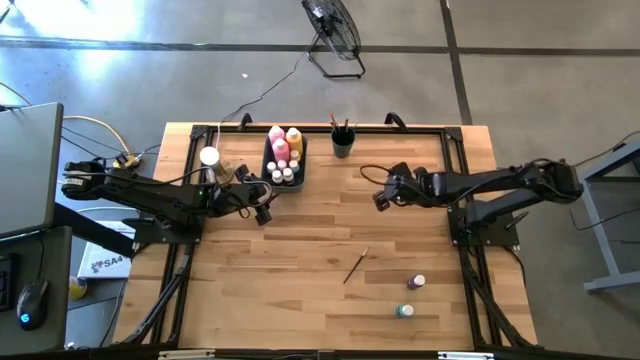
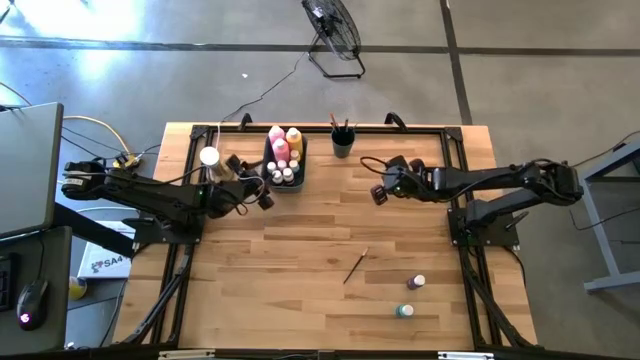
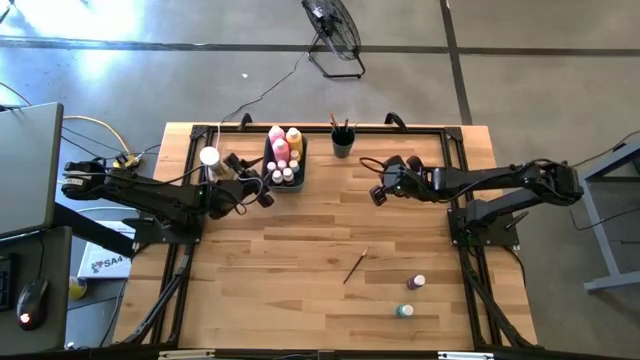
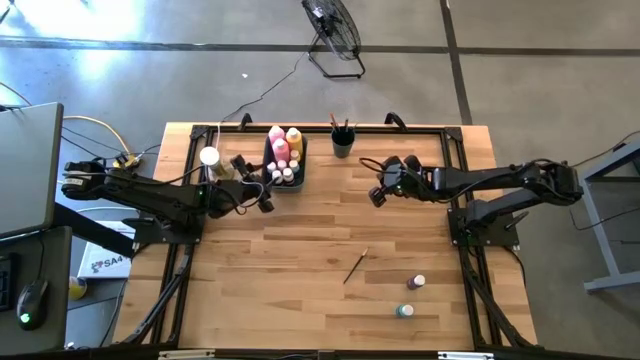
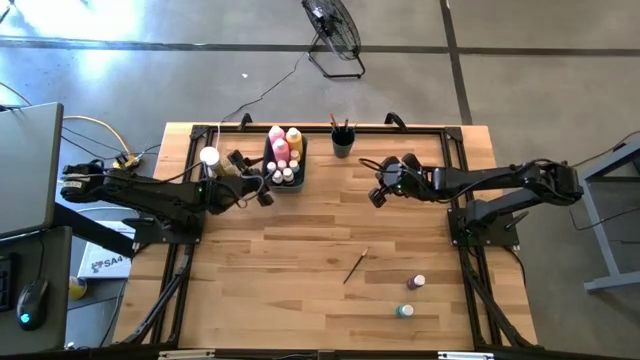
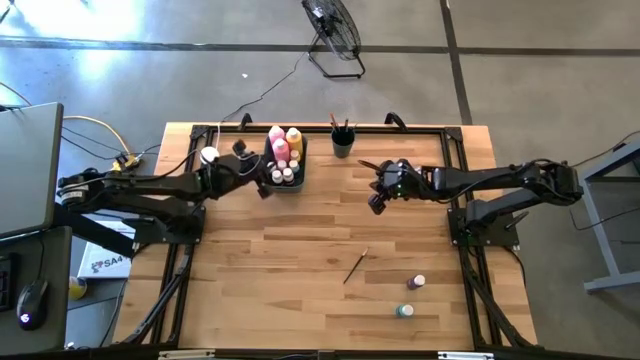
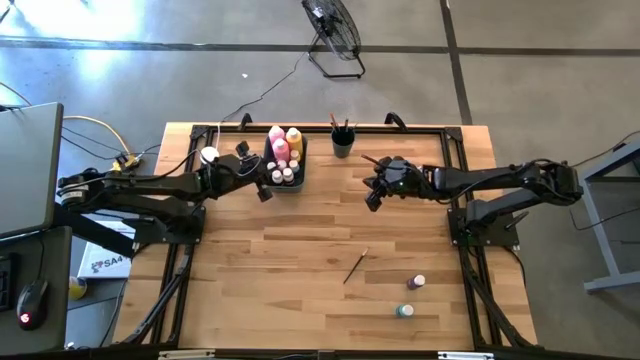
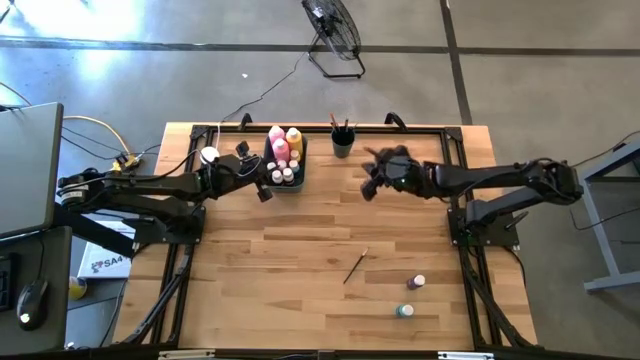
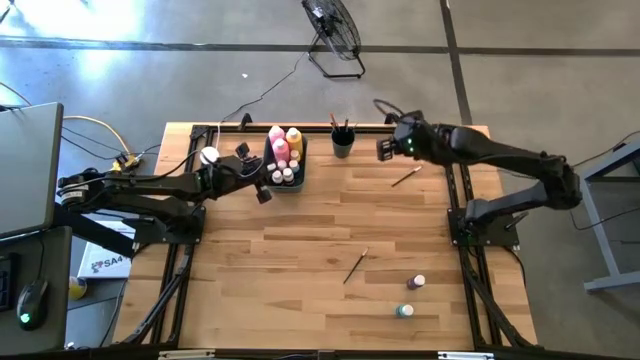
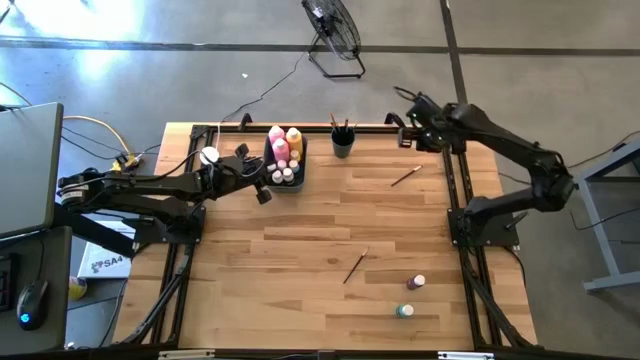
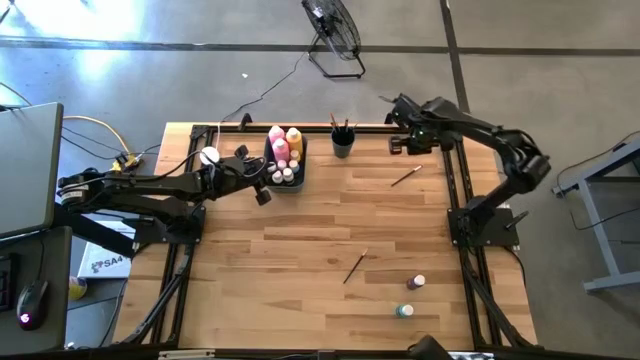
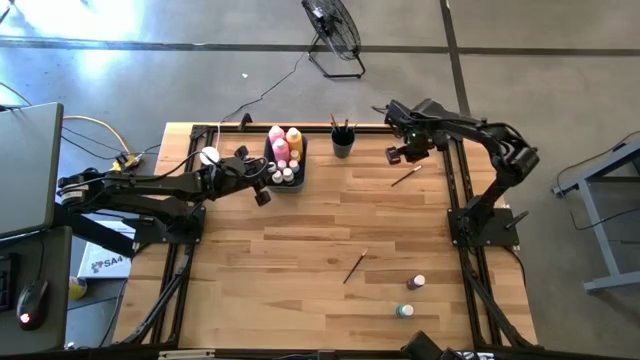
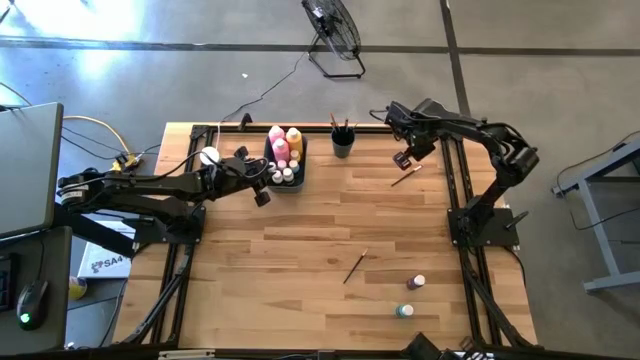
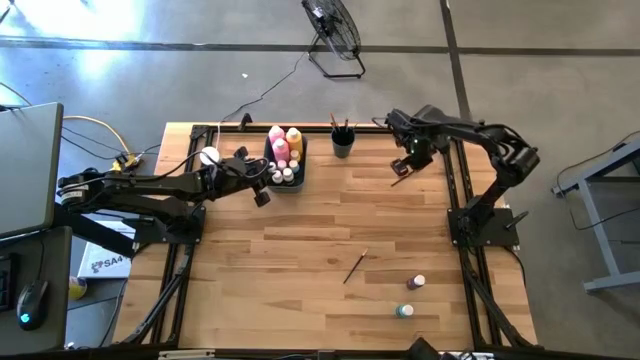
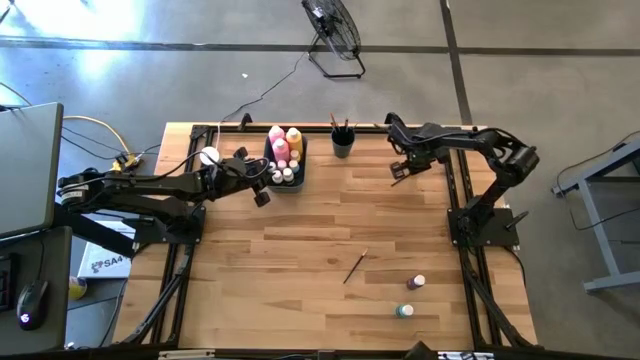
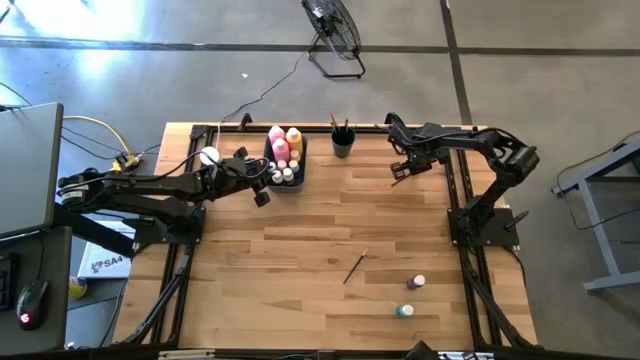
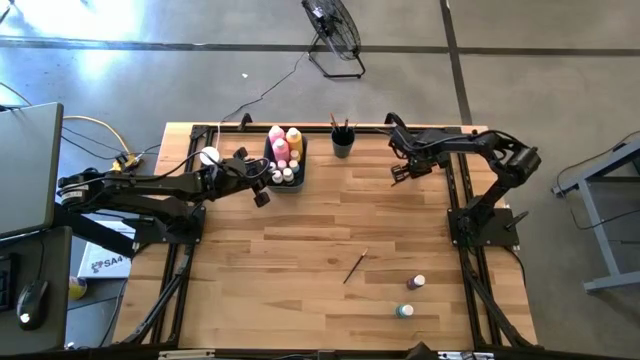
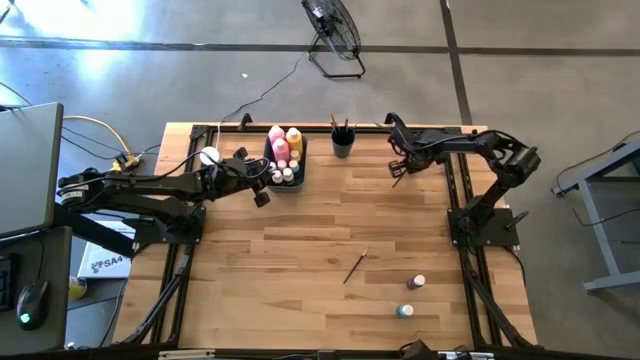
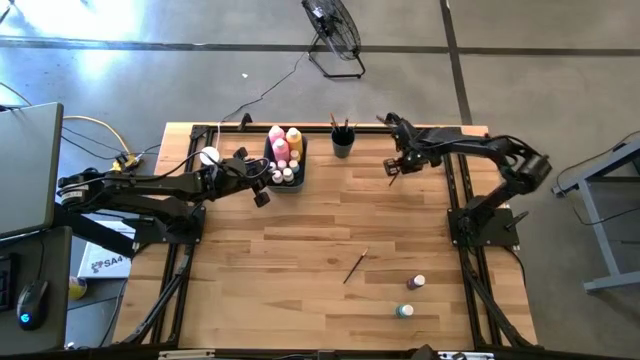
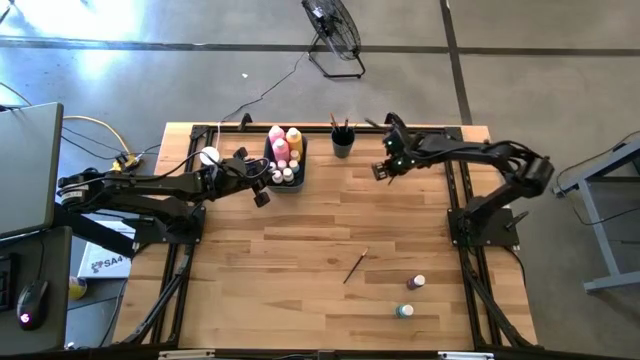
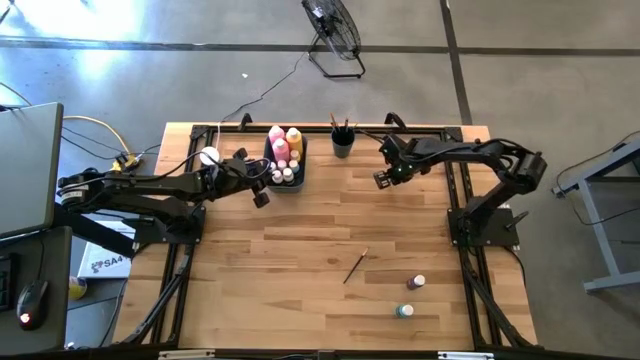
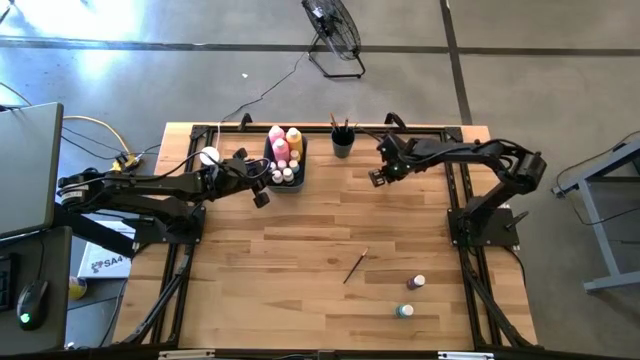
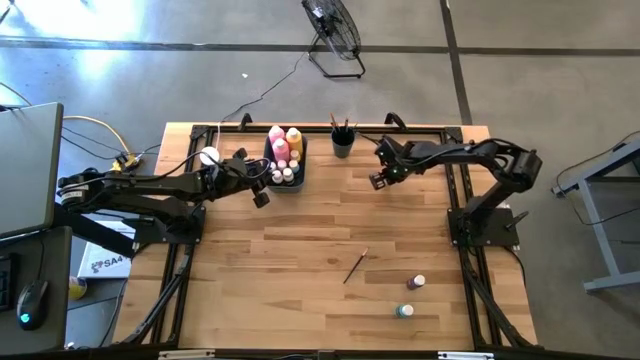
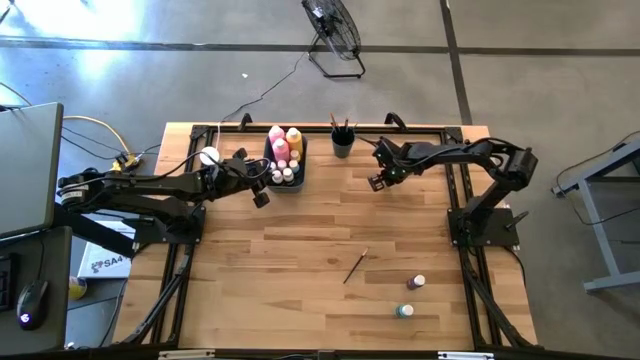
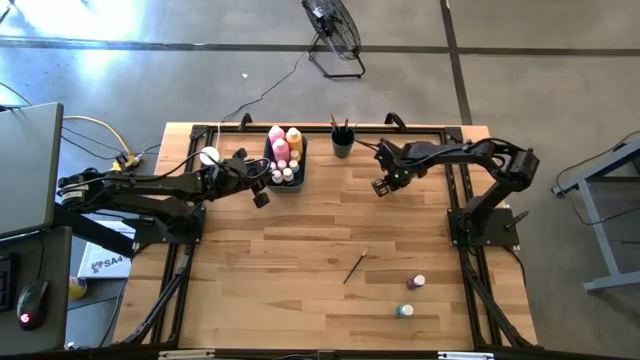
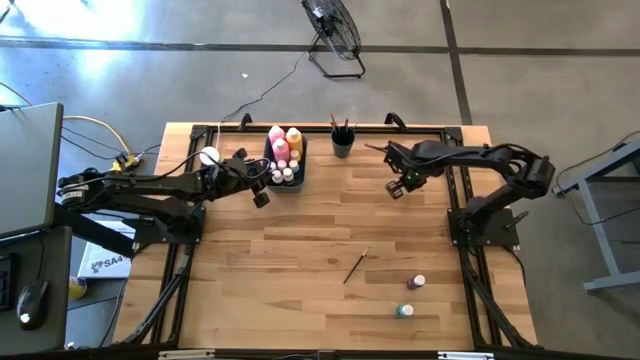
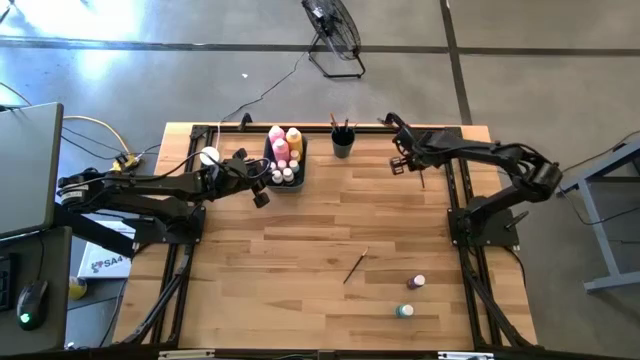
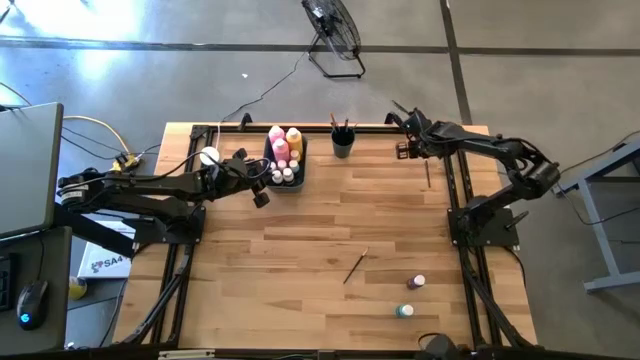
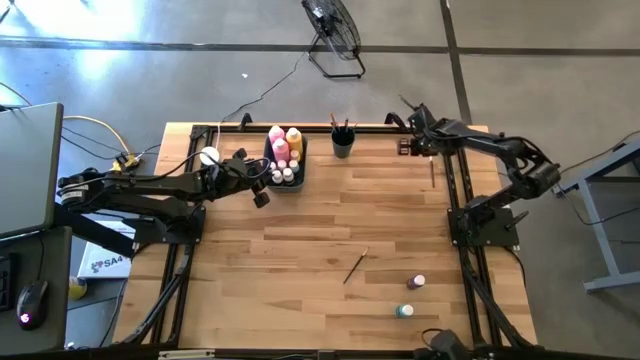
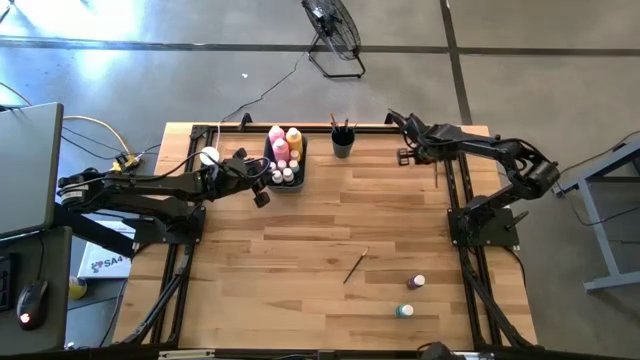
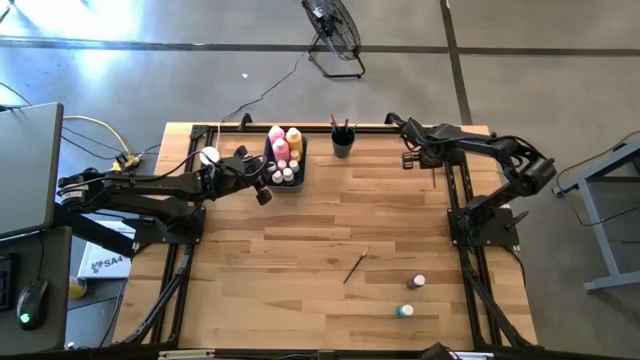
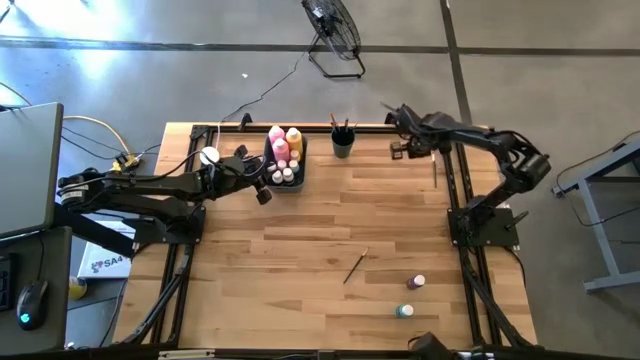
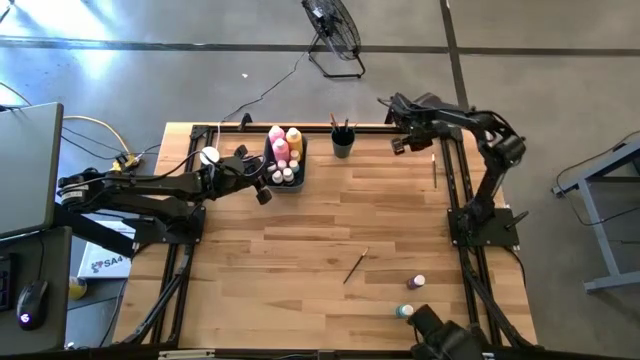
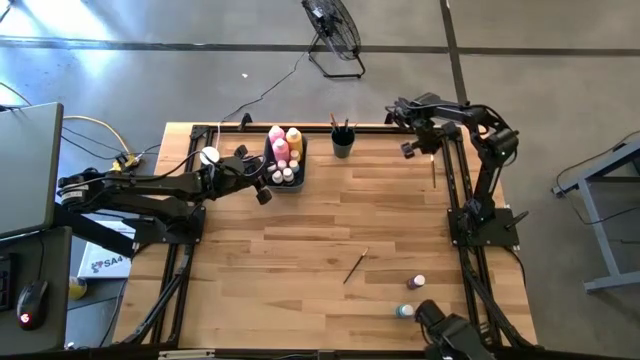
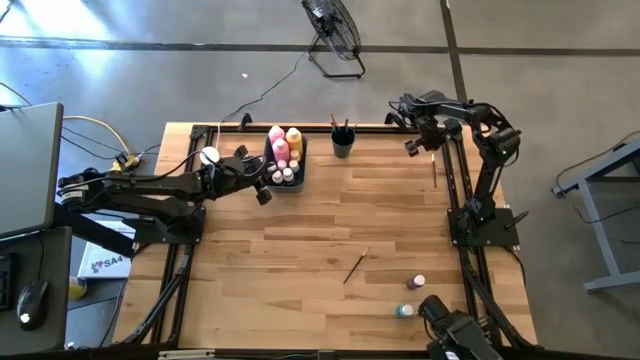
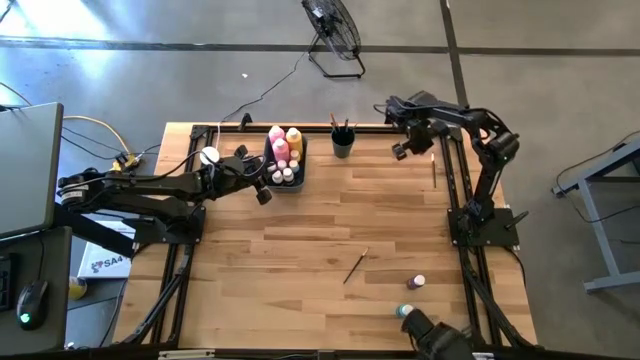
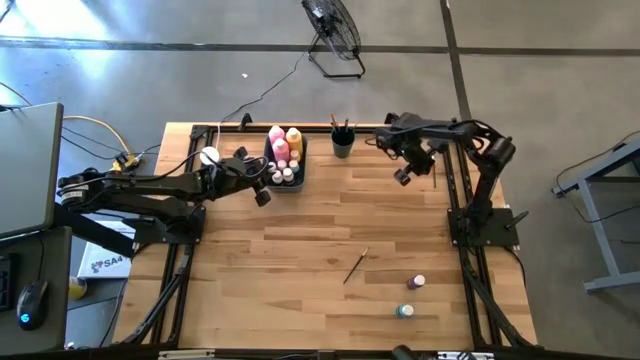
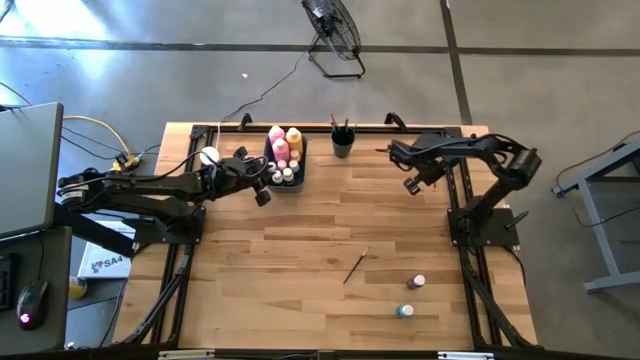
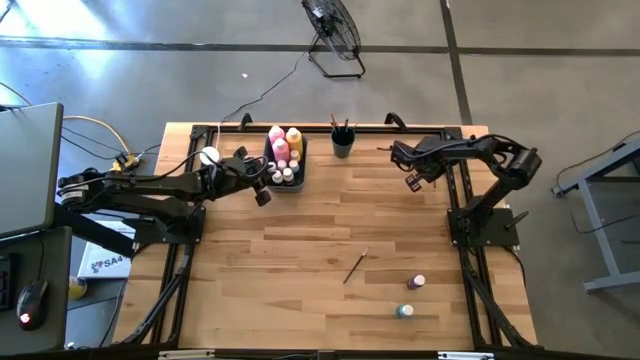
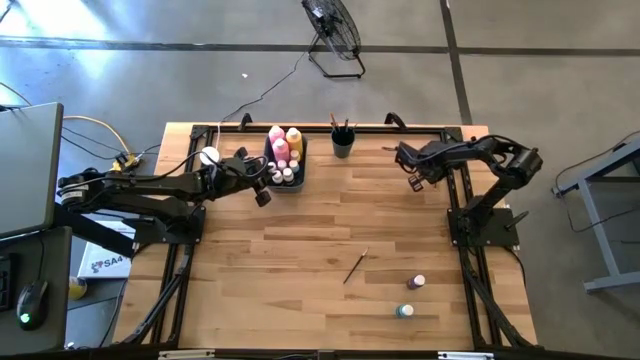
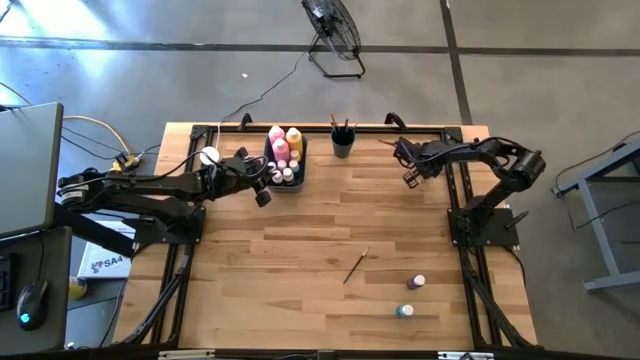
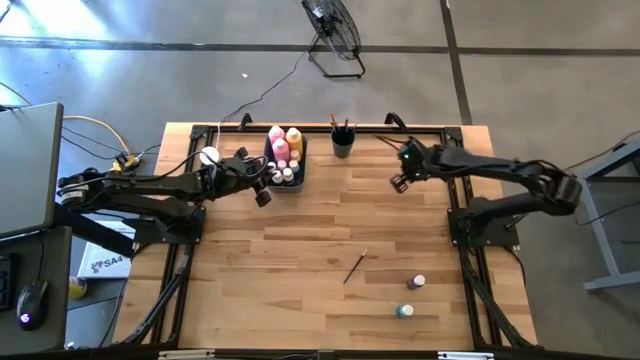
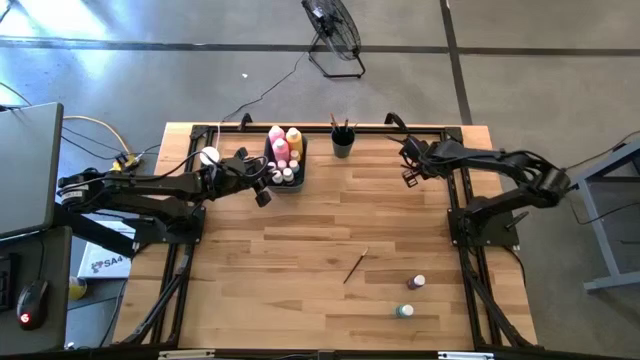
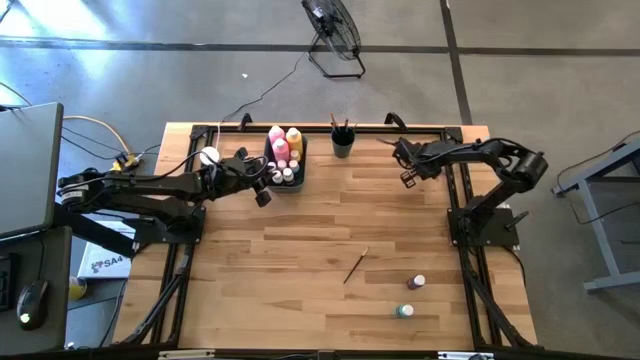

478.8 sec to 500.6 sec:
Task: Pick & Place Paint Supplies
Put the silver paint brush into the green cup
